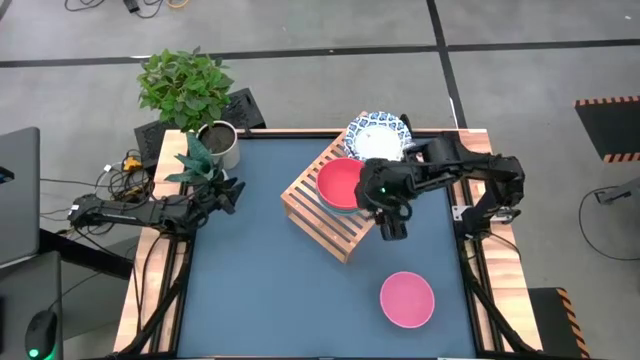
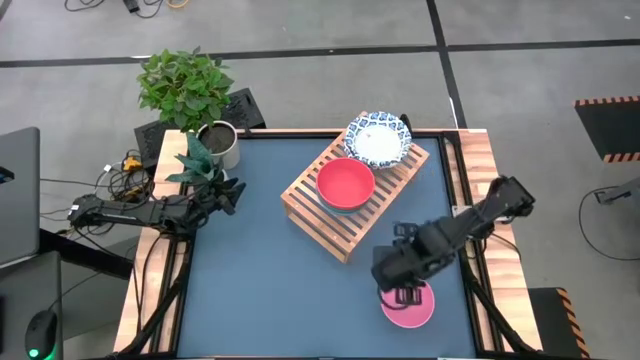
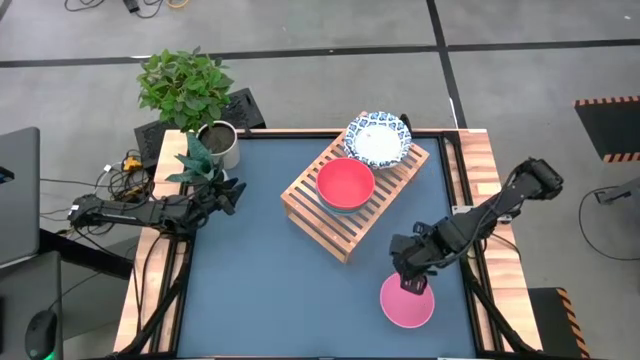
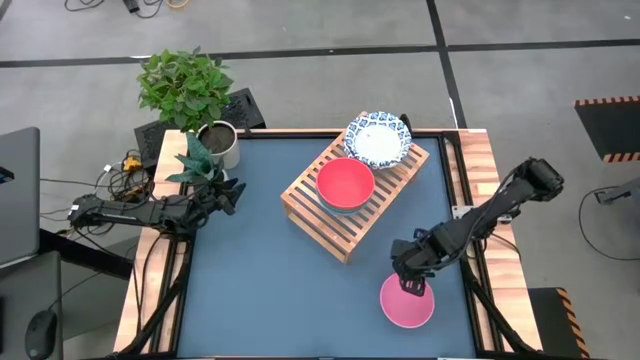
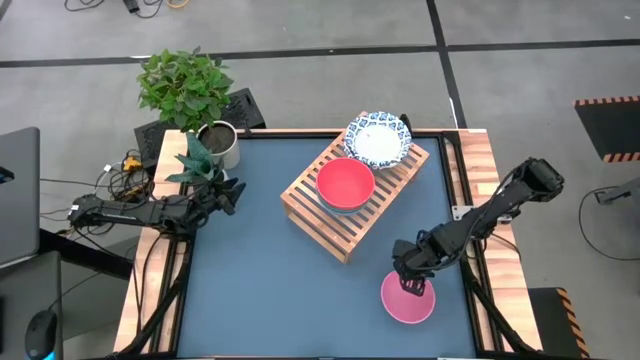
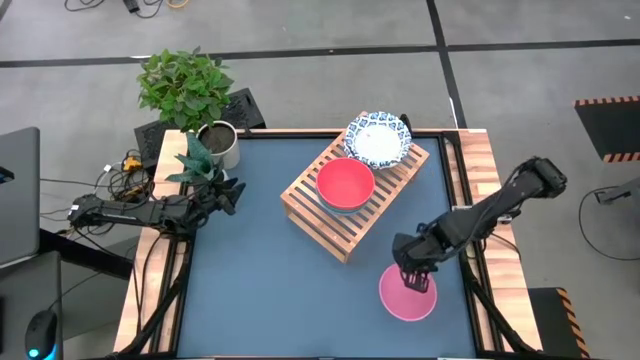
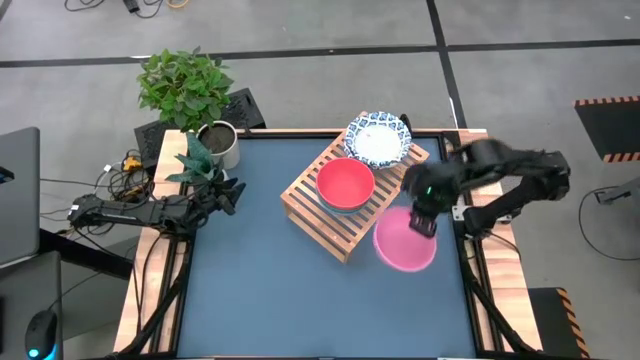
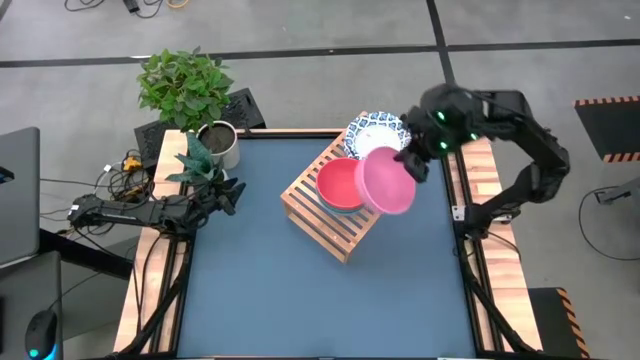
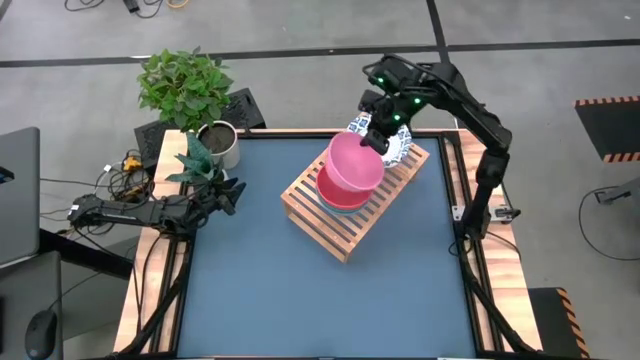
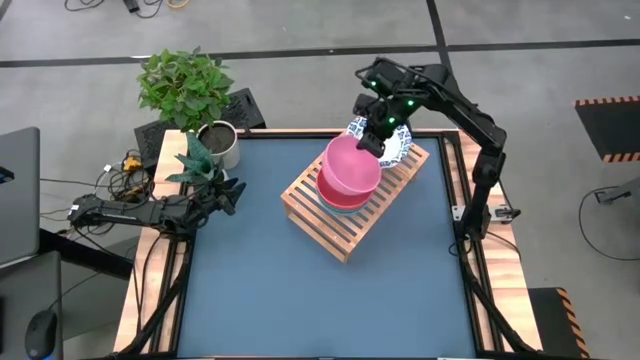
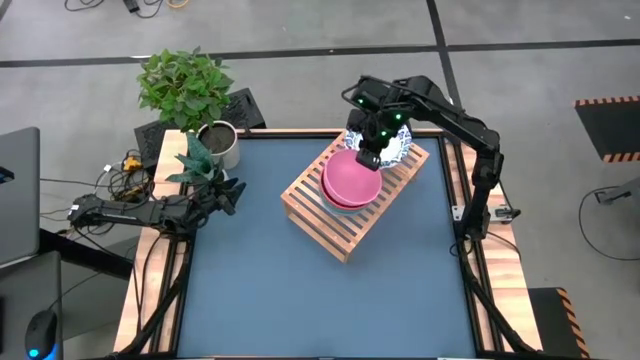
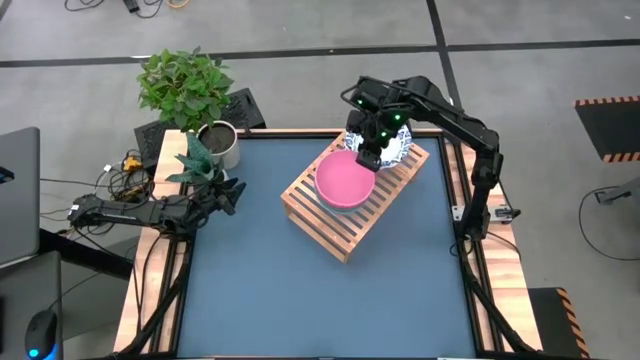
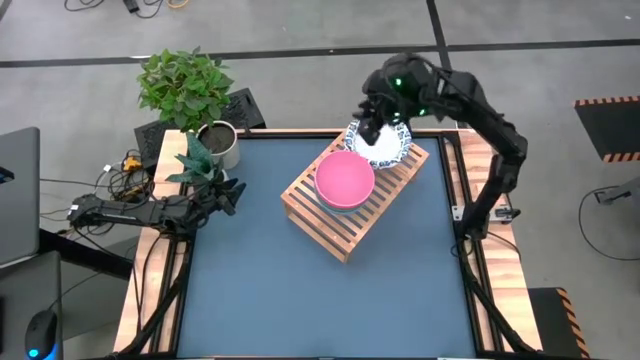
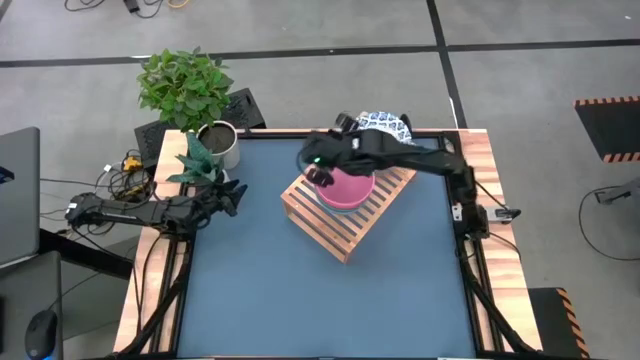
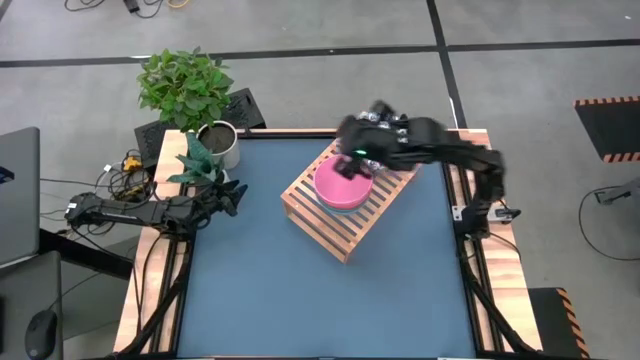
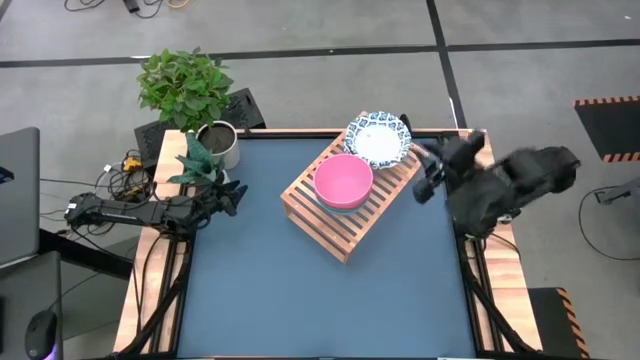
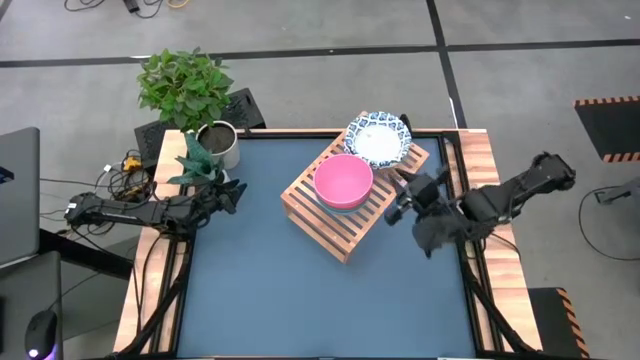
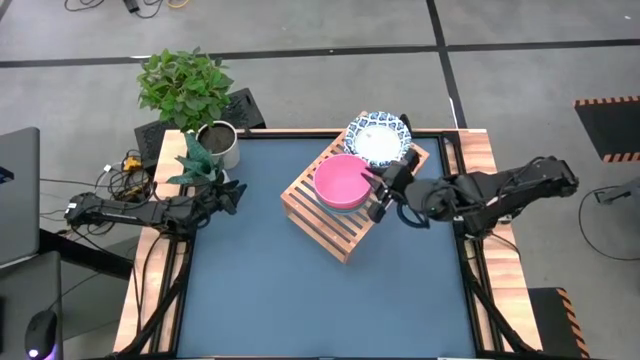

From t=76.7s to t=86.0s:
Task: Place and stack bowls onto a shelf
Stack the pink bowl on top of the orange bowl

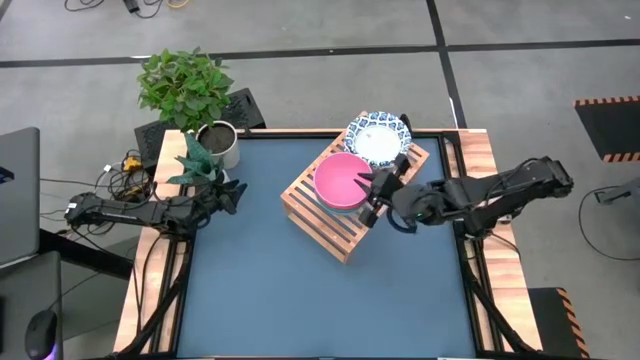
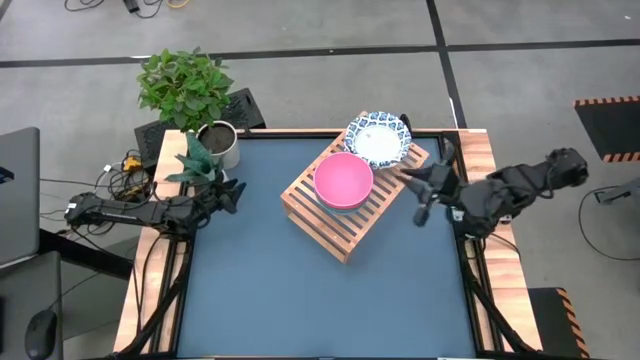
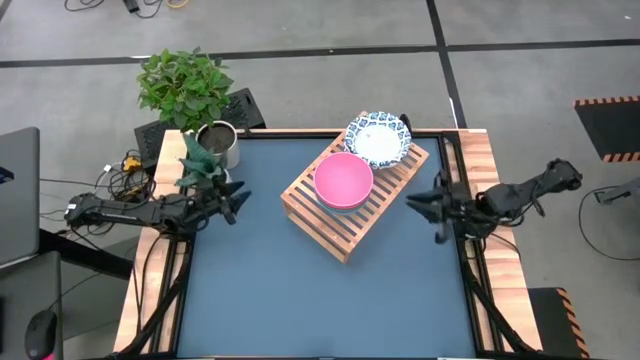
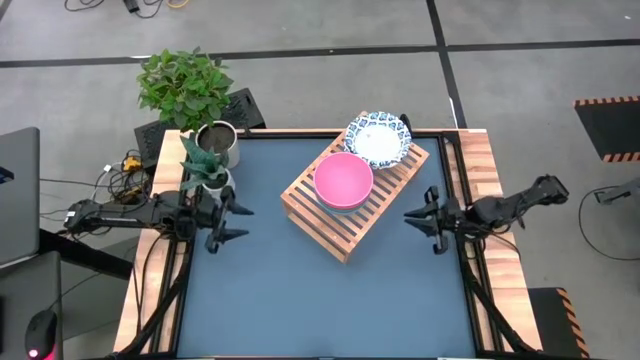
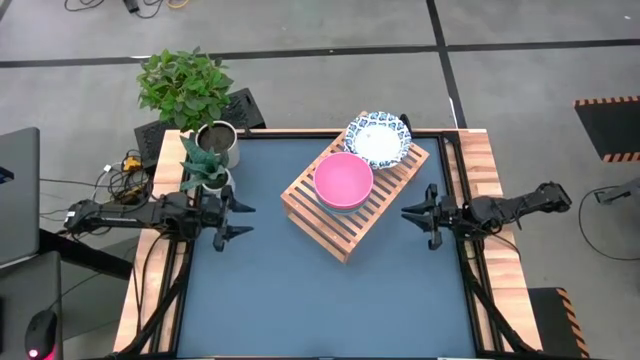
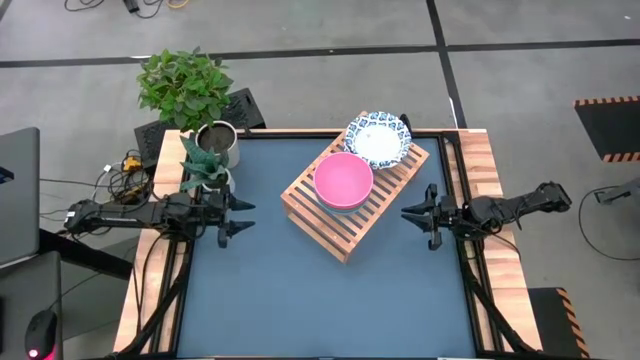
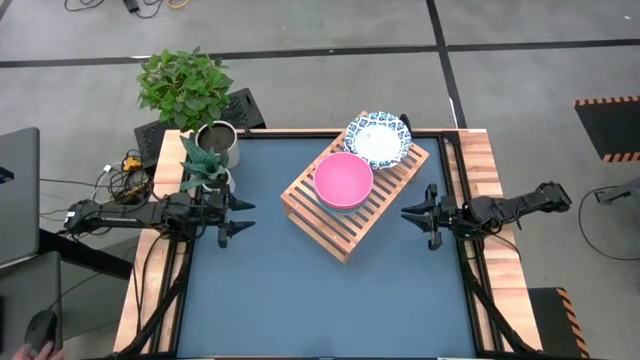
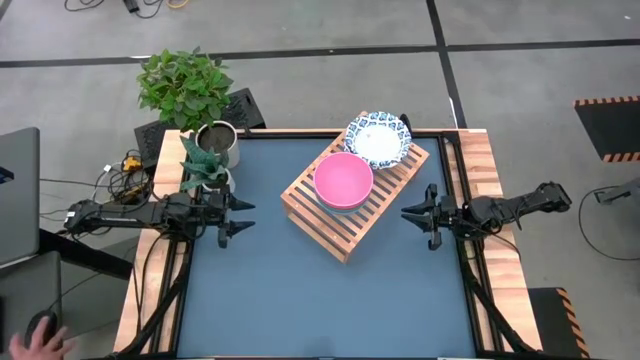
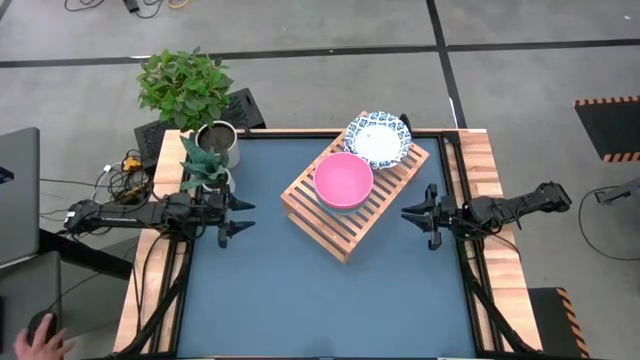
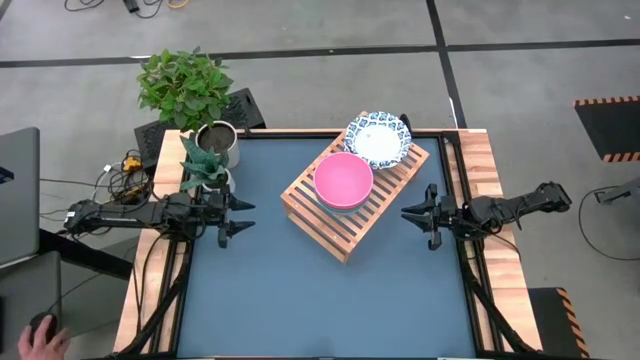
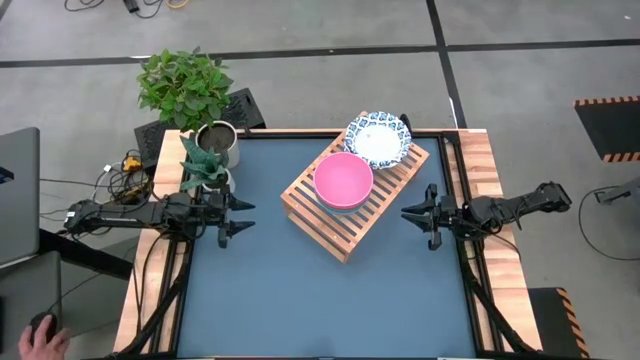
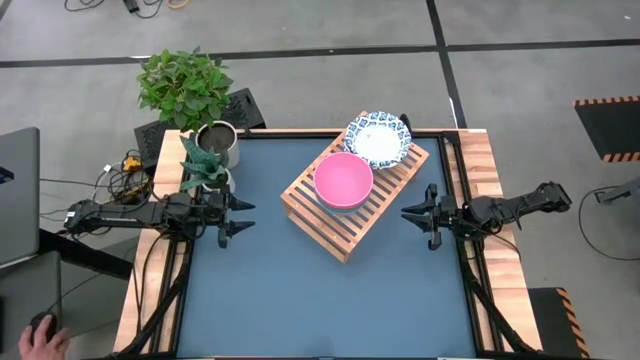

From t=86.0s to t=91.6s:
Return to Home Position

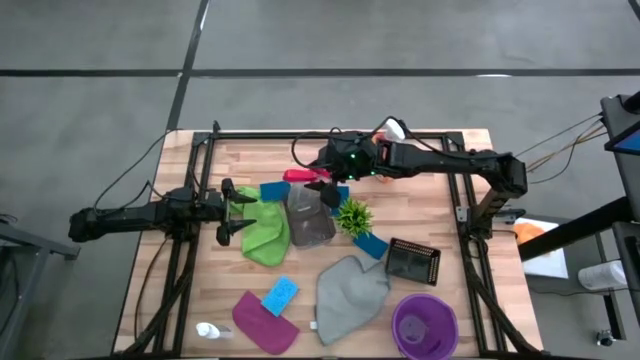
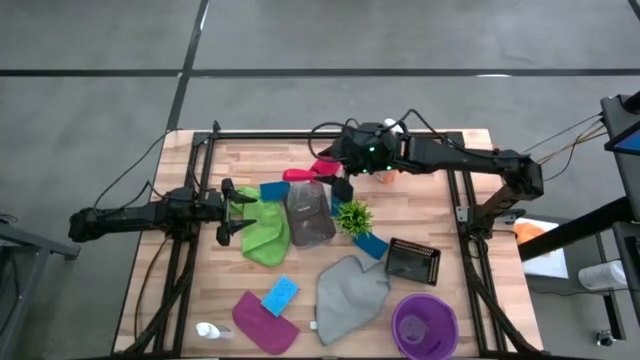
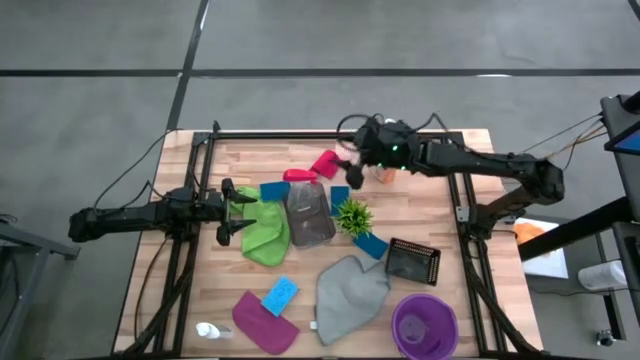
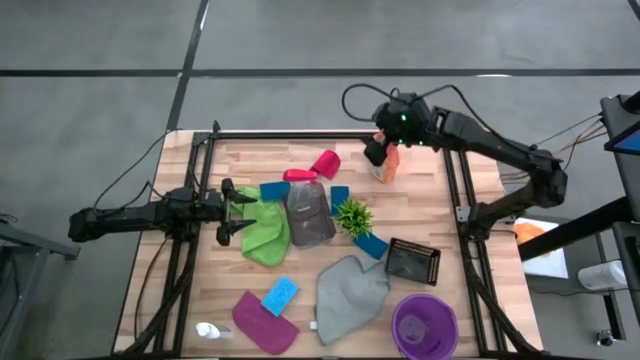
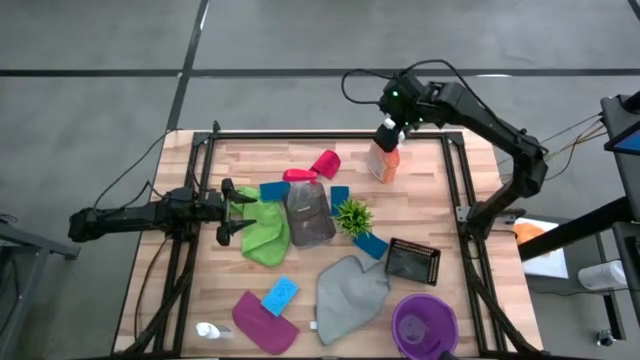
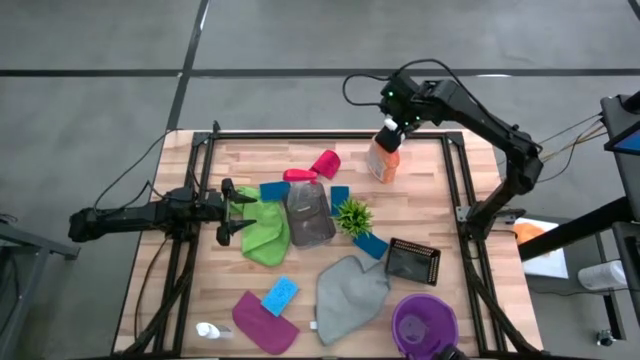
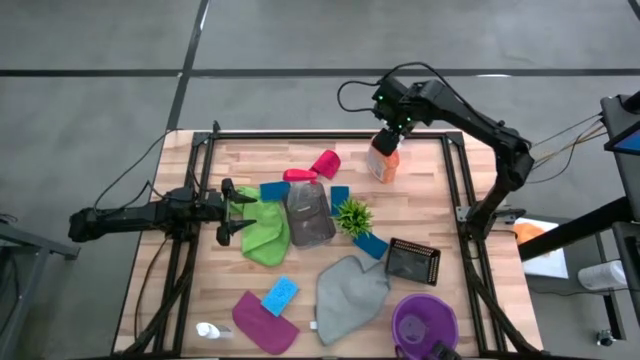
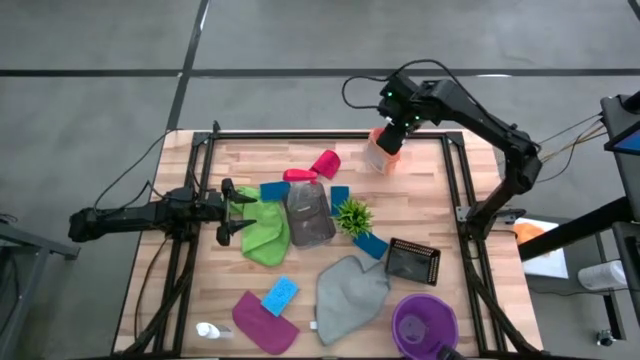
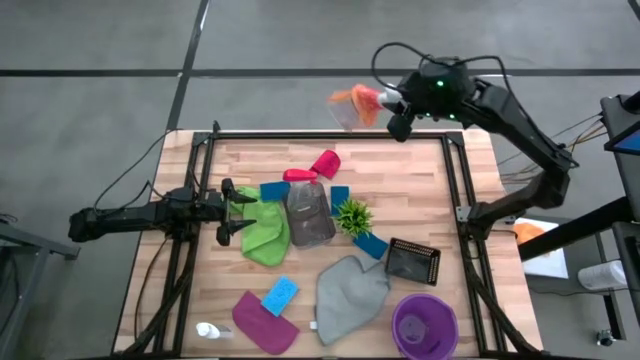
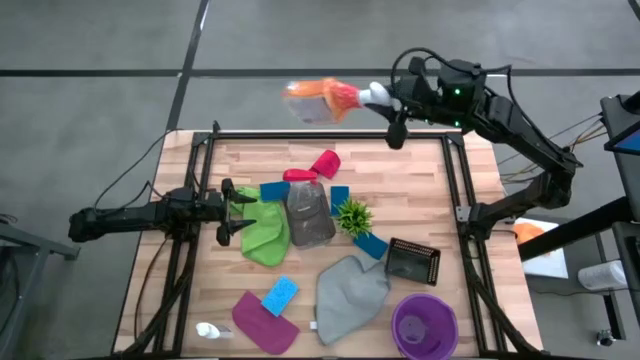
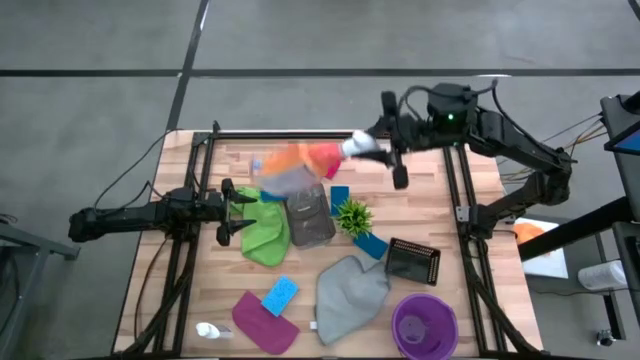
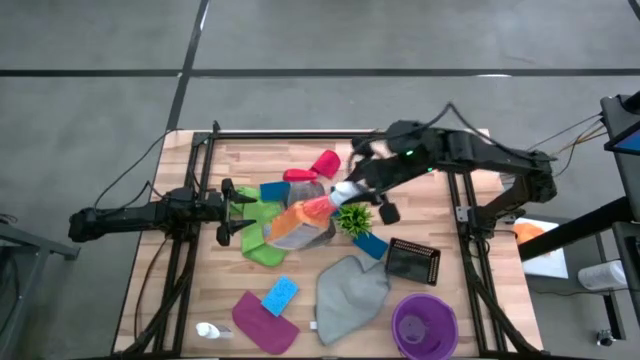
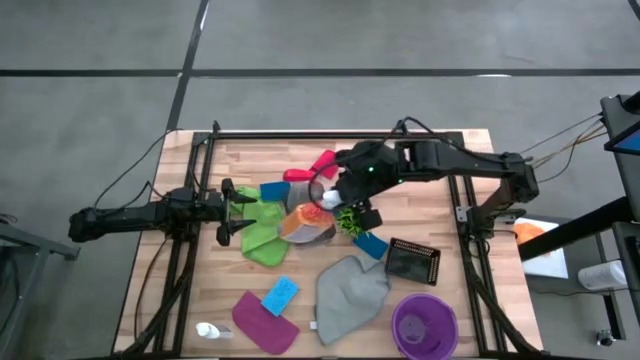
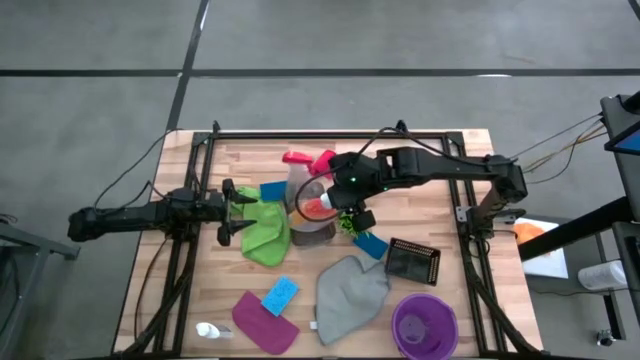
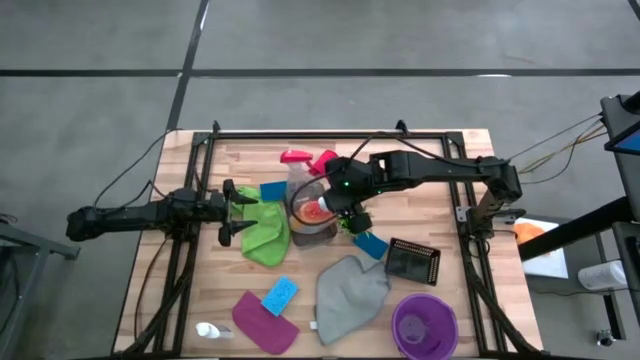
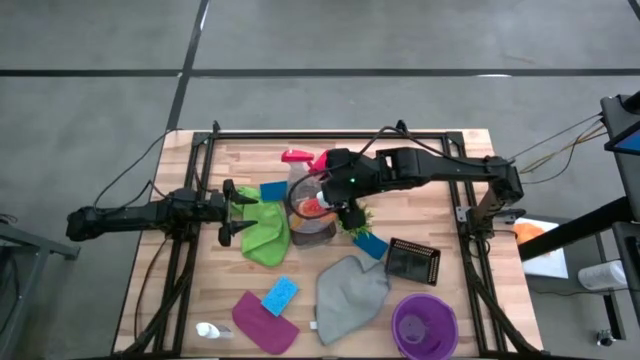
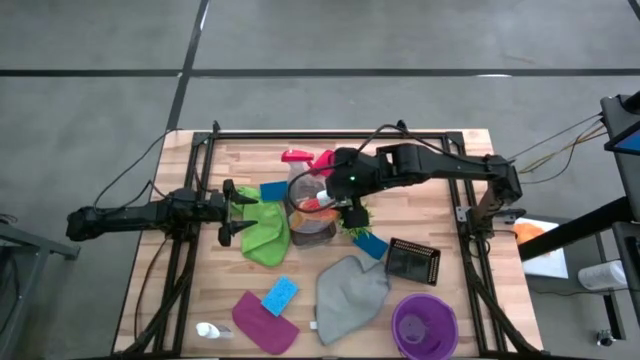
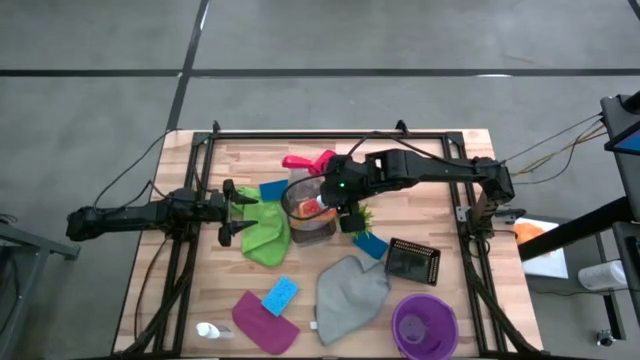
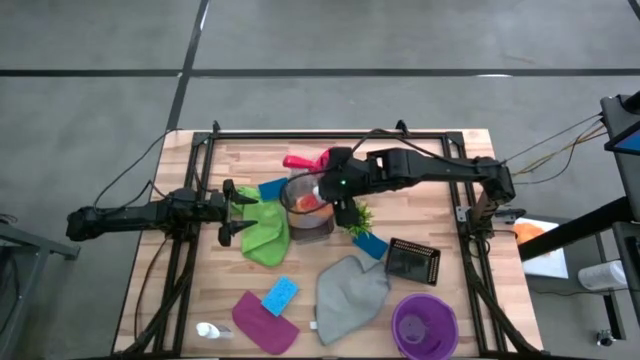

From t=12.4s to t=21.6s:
Task: Pick & Place Kitchen Items
Put the orange spray bottle into the transparent black bin
